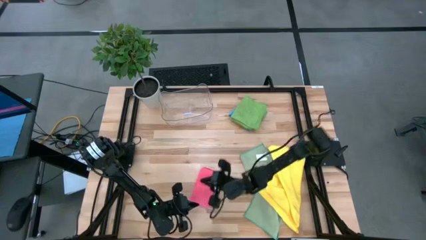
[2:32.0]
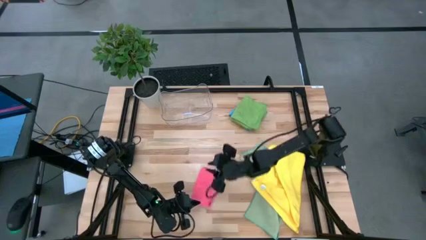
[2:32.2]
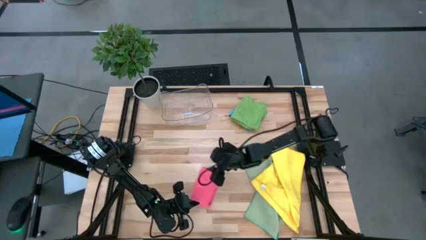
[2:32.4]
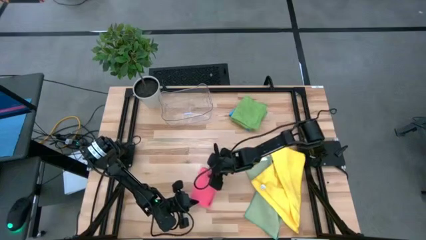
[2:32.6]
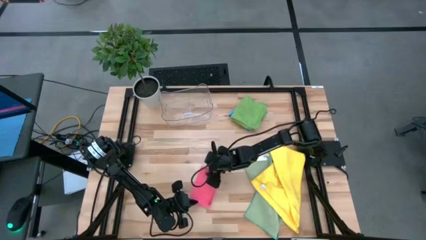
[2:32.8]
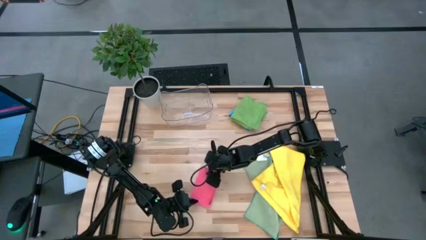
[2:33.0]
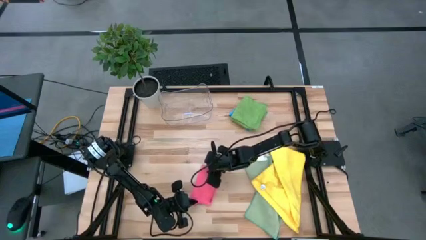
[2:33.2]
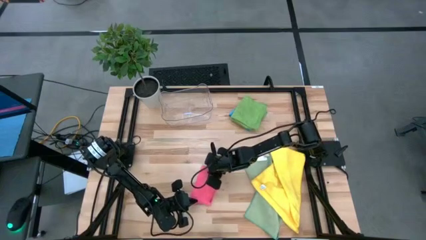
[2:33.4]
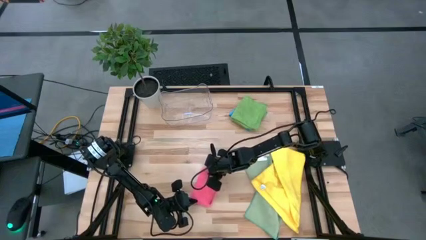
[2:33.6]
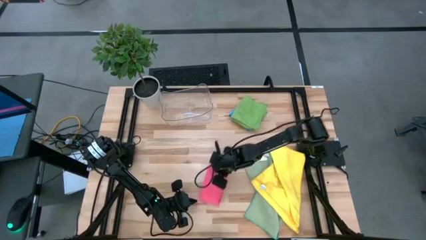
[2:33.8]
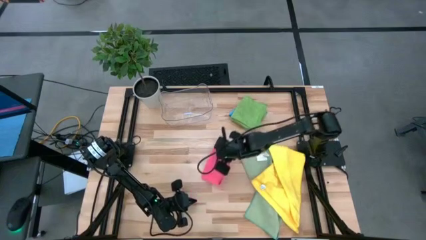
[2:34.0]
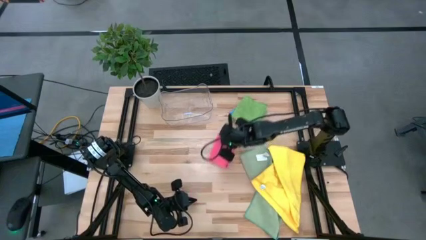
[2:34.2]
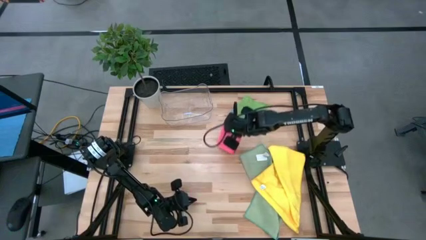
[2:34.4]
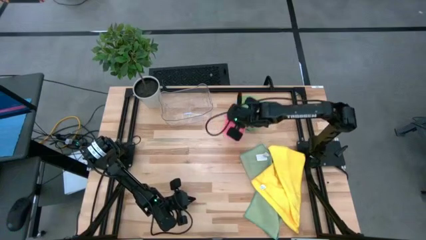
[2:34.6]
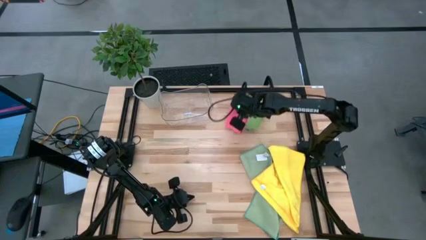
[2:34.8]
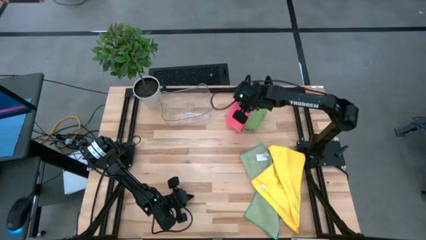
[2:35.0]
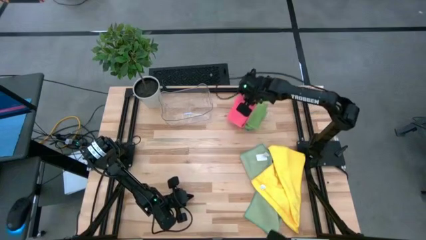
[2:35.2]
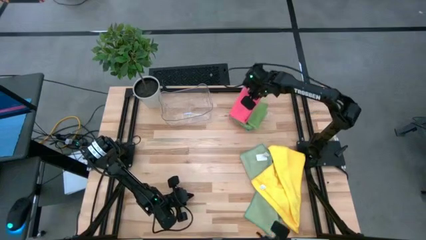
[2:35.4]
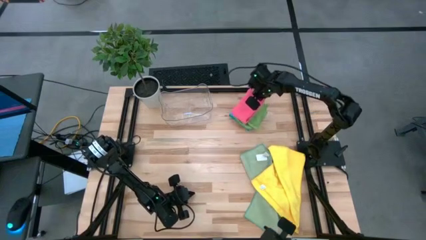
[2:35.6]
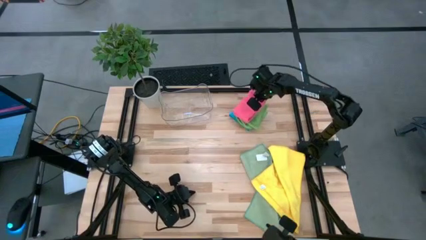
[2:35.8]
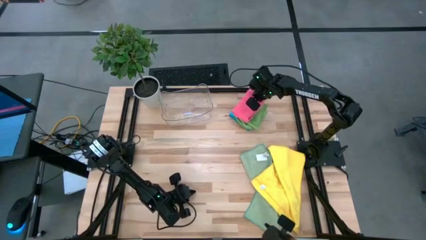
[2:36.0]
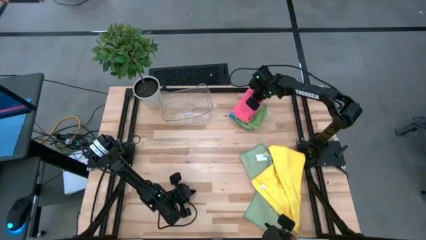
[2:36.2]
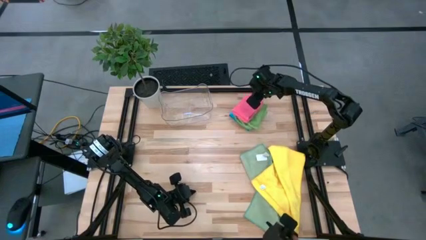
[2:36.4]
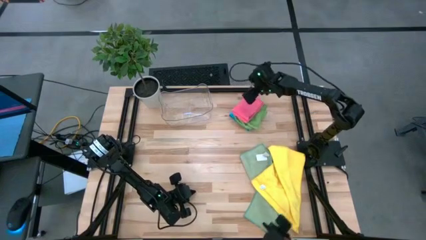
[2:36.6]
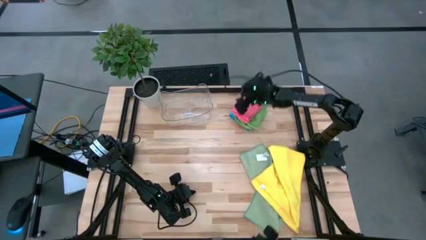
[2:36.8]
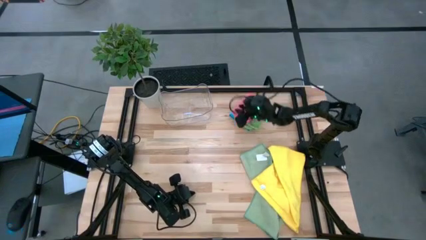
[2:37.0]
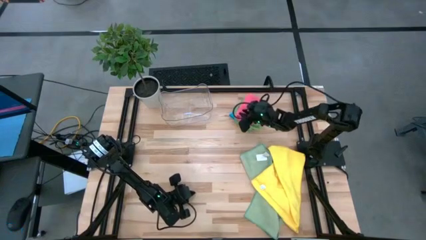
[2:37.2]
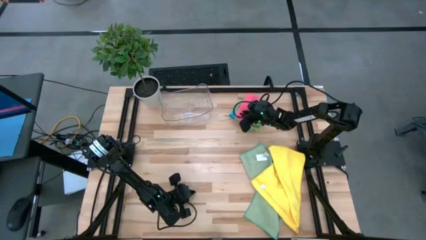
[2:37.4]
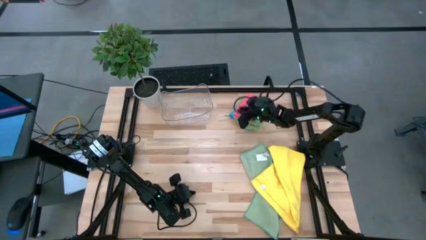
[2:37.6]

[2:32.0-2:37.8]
Task: Fold microfiber towels
Stack the pink microfiber cloth on the green microfiber cloth

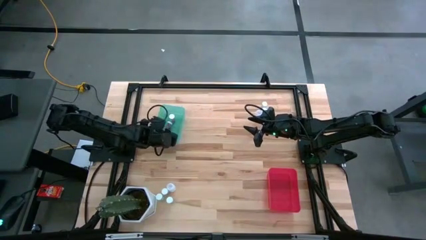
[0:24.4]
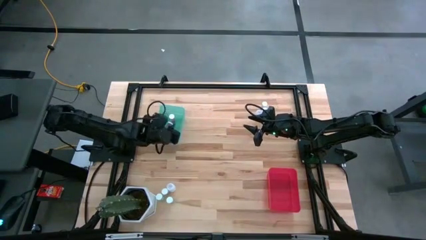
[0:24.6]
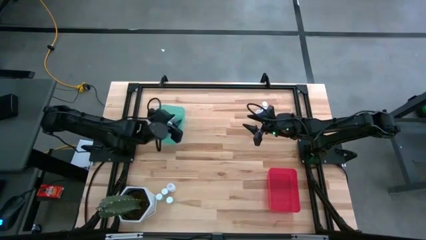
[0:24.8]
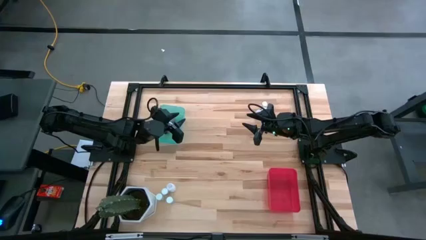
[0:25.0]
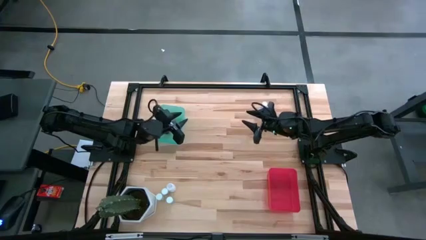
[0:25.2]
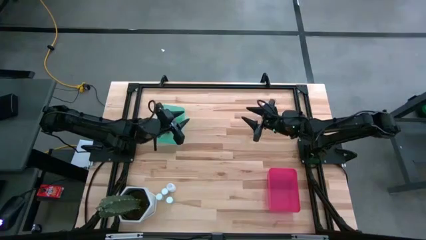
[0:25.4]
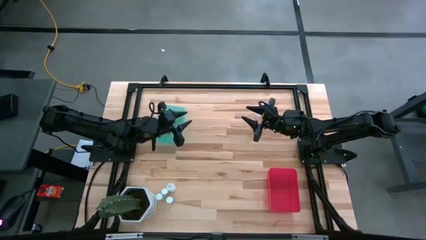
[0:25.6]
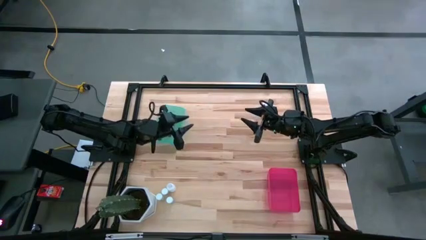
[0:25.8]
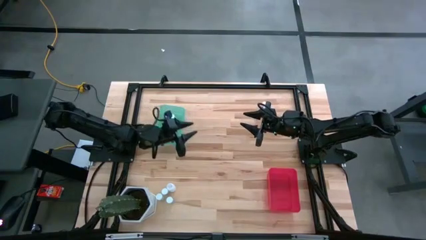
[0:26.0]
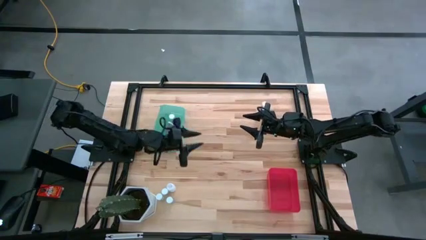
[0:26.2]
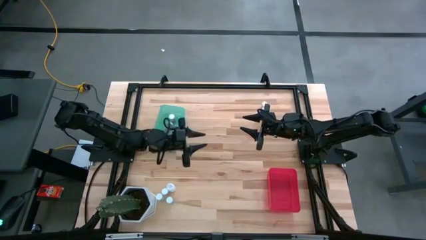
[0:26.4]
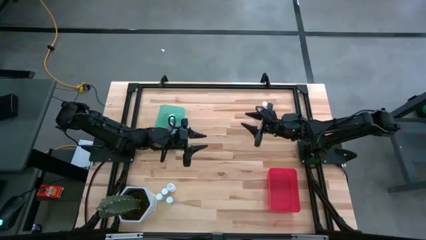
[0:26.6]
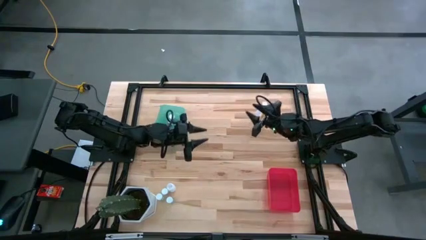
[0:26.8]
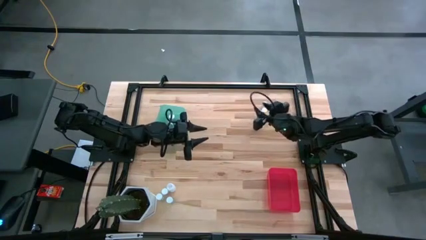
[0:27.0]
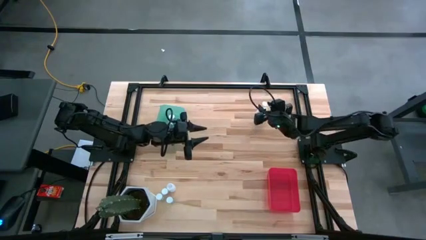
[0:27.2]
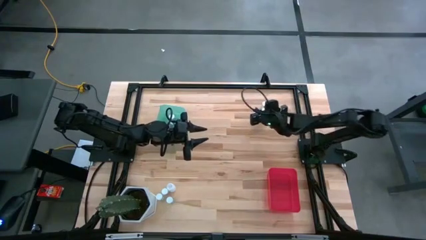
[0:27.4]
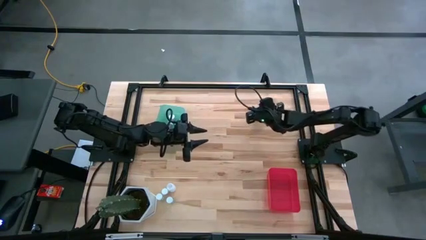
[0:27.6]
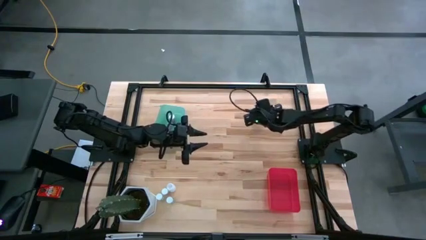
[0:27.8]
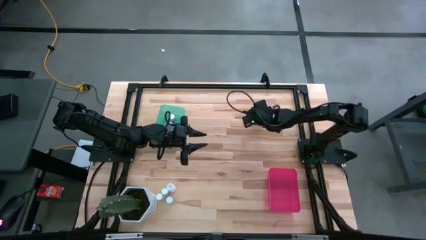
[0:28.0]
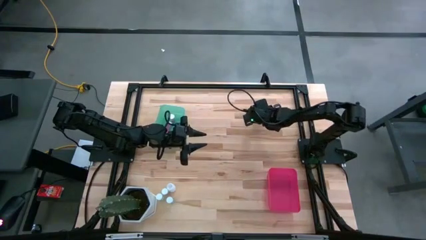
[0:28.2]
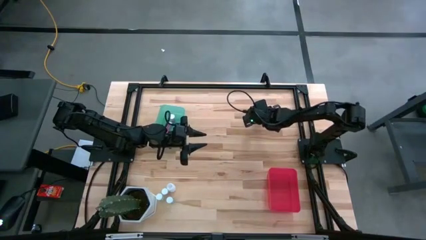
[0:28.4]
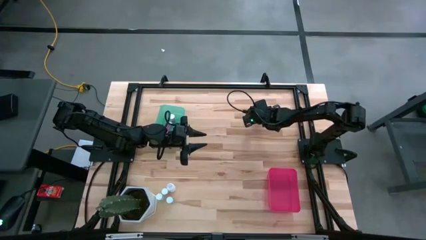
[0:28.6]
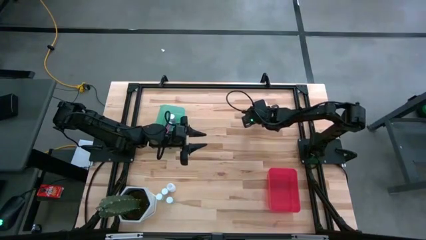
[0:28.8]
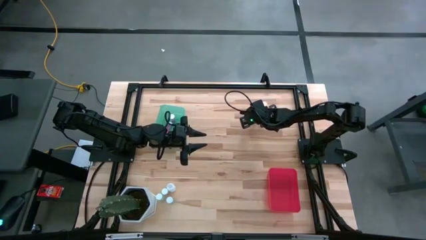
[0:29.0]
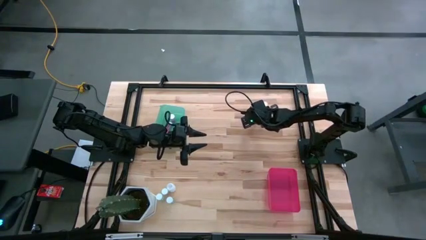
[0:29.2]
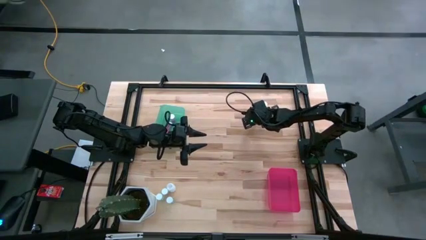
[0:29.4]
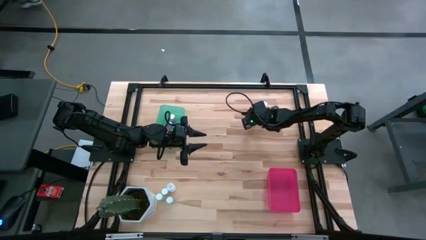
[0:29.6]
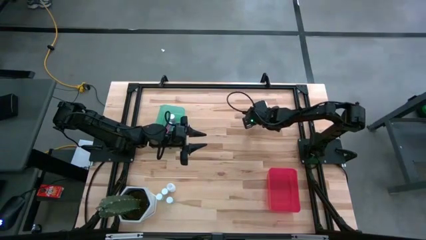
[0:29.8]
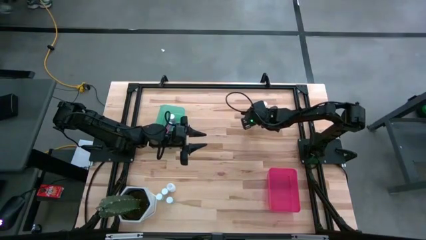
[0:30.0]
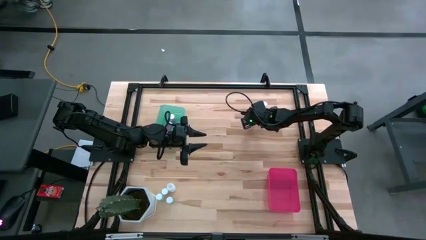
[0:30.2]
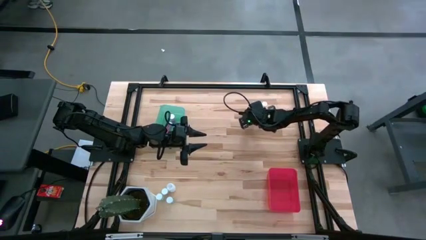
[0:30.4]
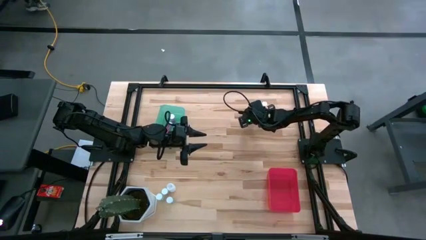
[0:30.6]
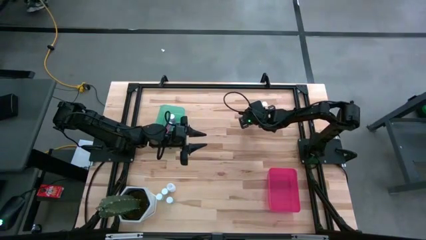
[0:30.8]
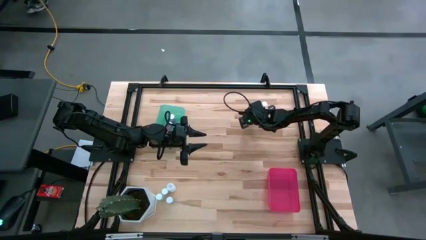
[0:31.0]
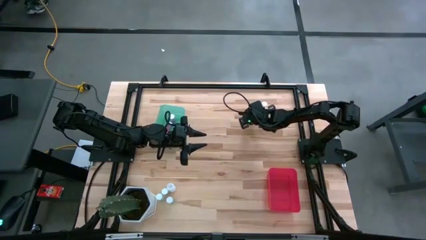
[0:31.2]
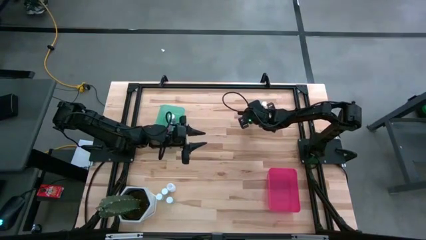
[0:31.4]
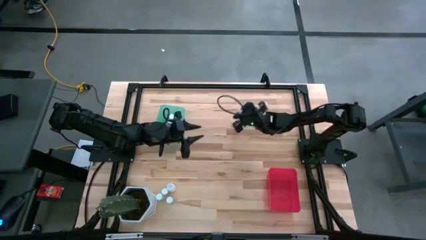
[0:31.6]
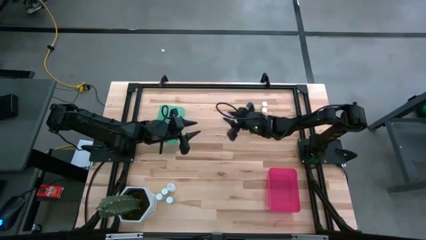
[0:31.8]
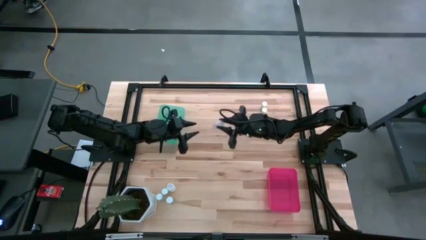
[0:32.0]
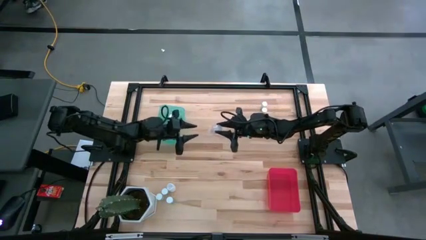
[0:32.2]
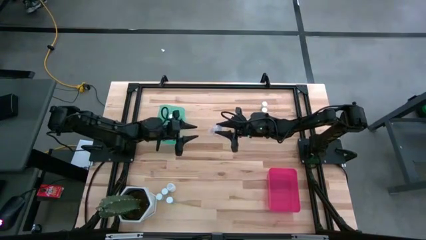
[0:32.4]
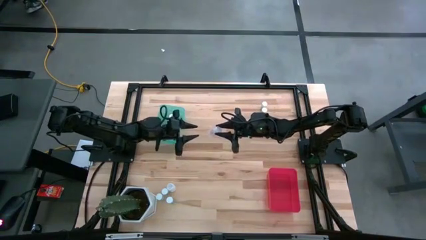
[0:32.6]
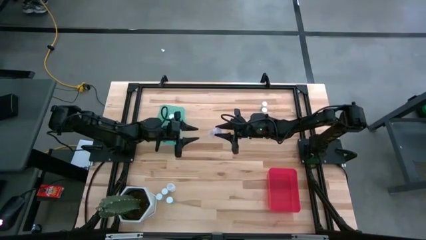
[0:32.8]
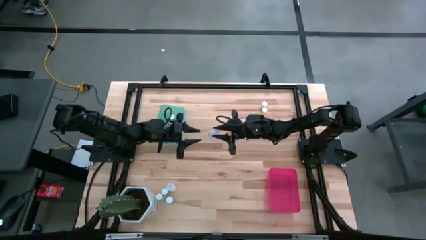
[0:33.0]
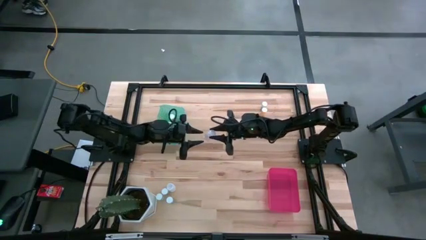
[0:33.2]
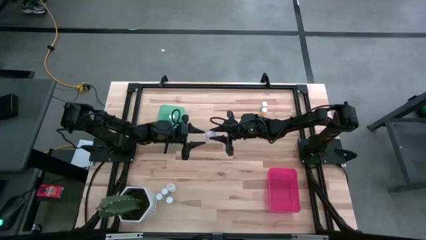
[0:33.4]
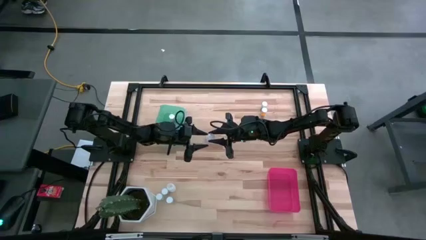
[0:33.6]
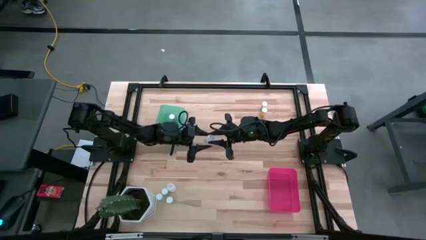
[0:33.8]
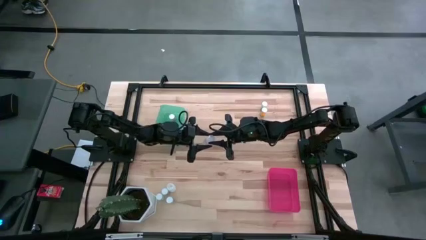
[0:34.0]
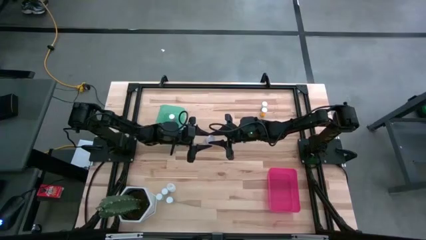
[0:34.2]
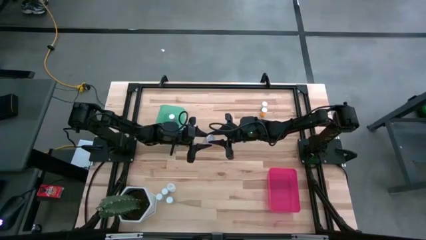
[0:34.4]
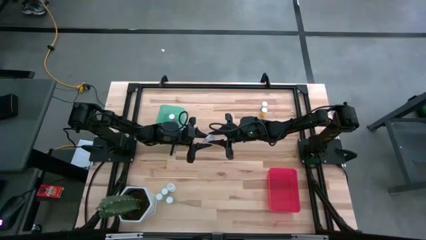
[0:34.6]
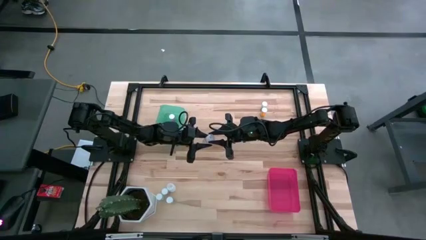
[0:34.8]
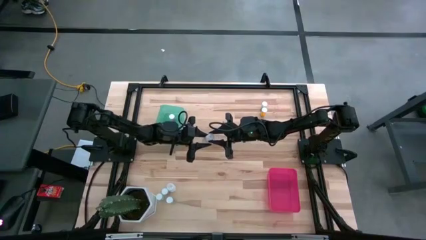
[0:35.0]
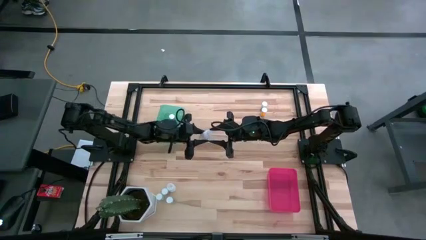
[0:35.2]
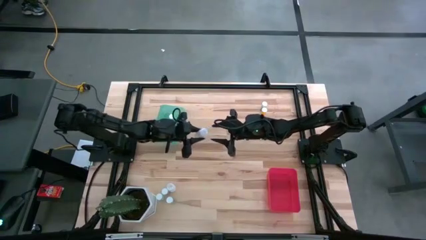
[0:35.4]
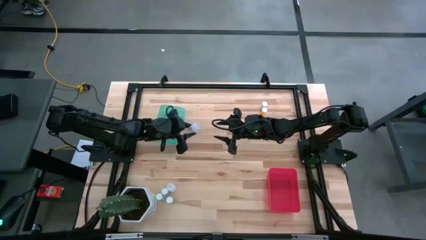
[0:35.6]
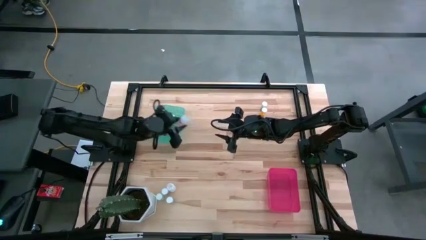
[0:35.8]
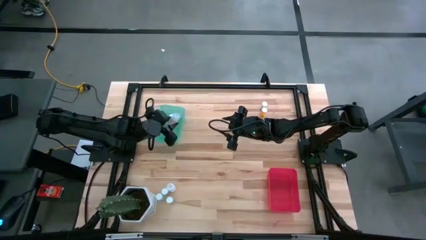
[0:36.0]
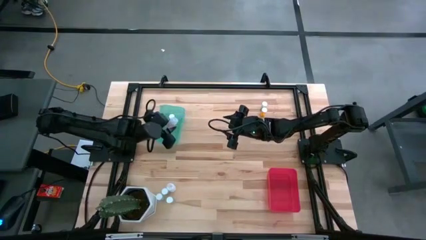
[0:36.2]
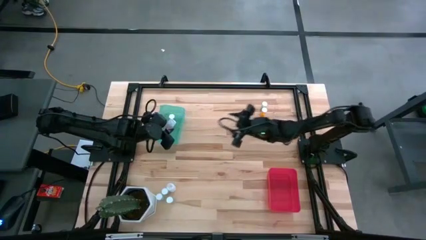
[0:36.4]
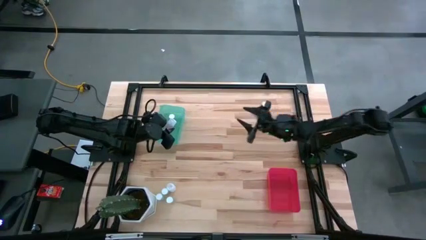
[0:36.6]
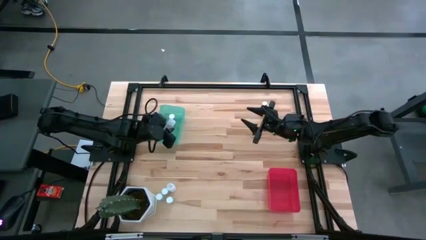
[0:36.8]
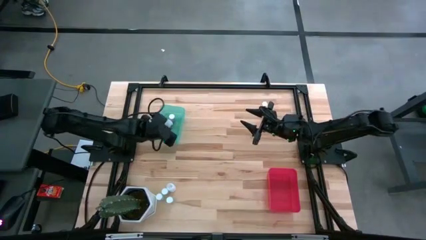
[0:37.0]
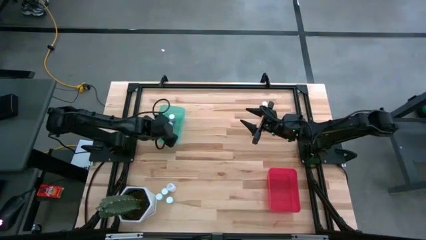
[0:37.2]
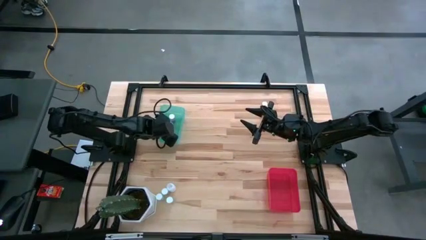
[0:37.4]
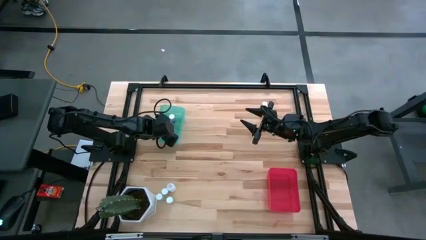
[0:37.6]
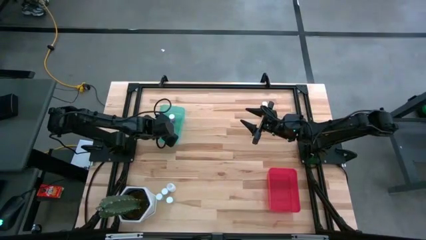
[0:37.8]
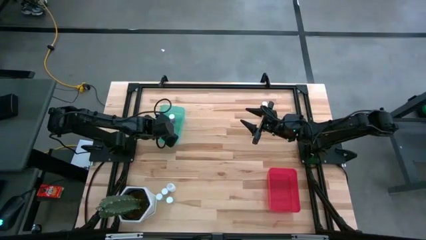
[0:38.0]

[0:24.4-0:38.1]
Task: Pick and place medicine bottles into bin by pill shape (circle, oval)
Put the transparent capsule bottle into the blue bin
